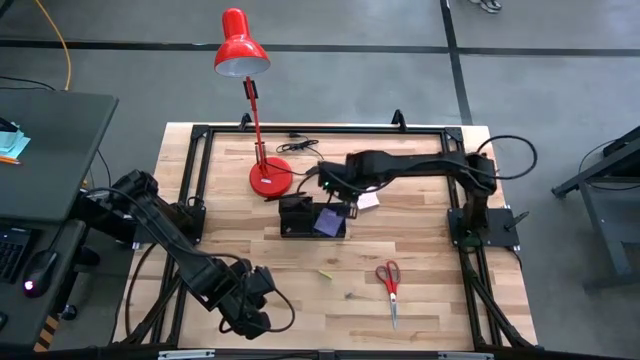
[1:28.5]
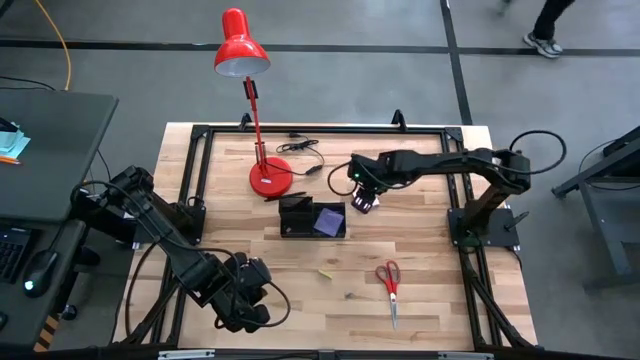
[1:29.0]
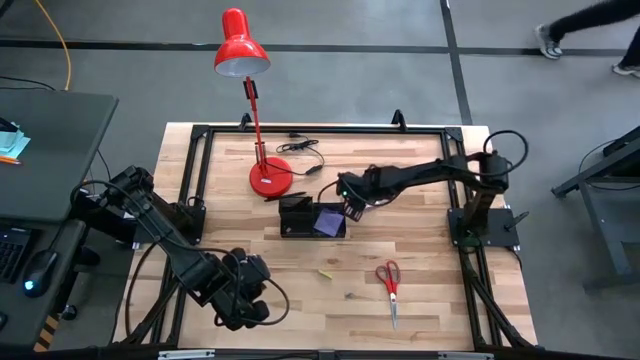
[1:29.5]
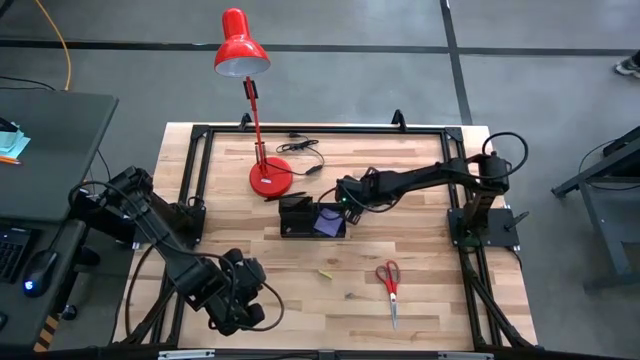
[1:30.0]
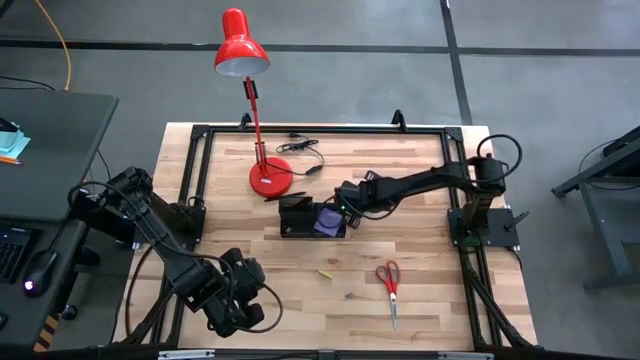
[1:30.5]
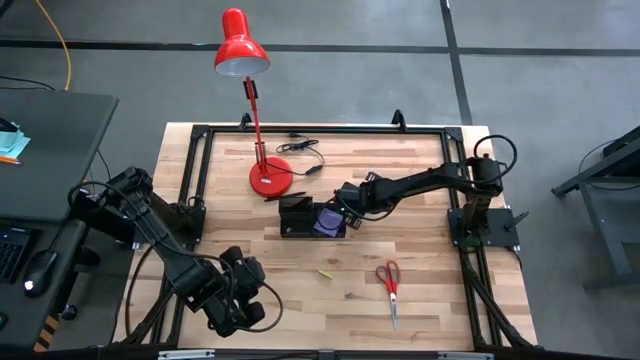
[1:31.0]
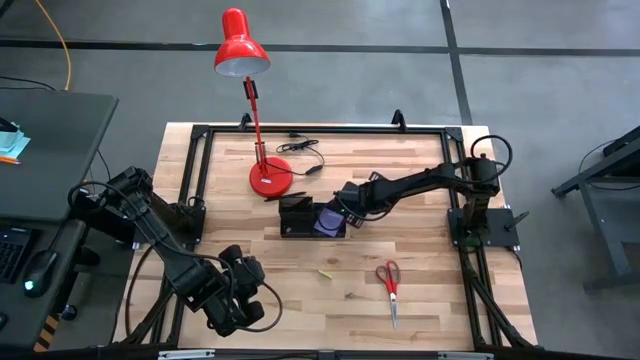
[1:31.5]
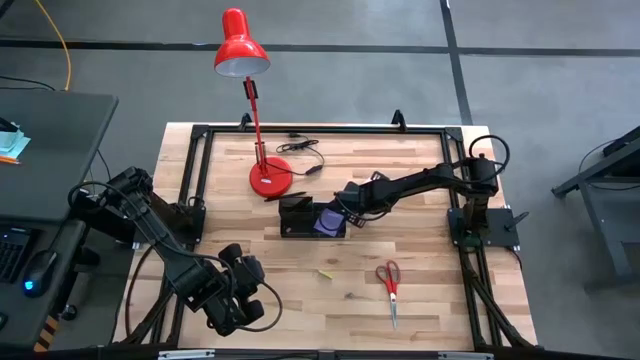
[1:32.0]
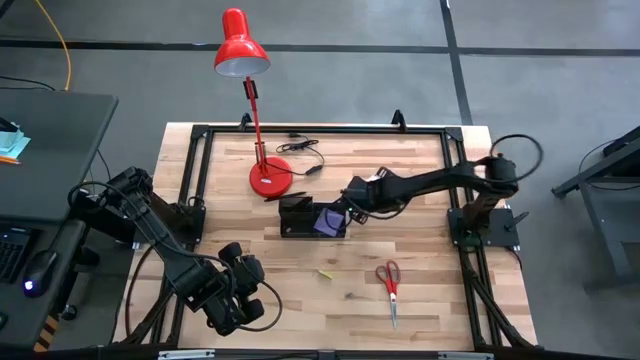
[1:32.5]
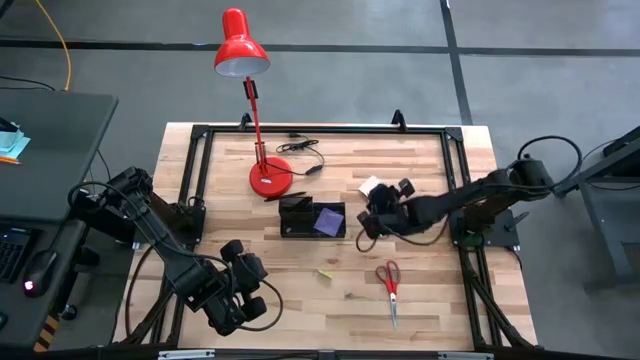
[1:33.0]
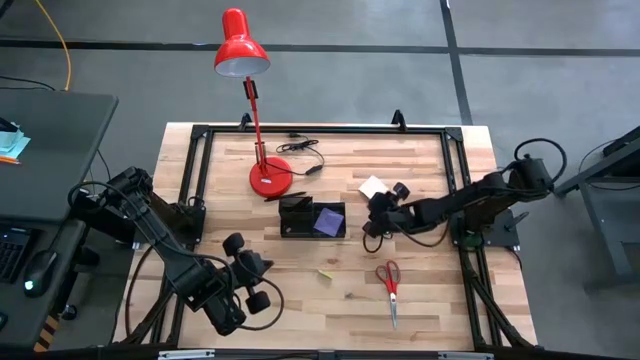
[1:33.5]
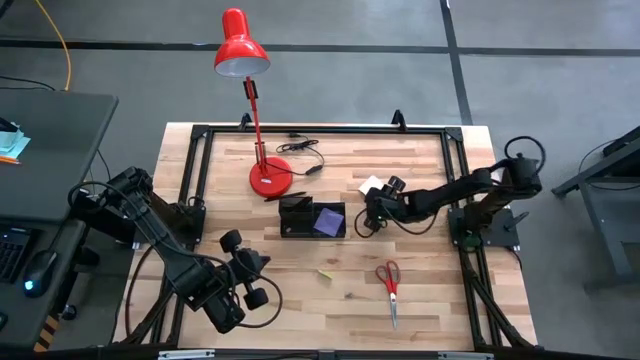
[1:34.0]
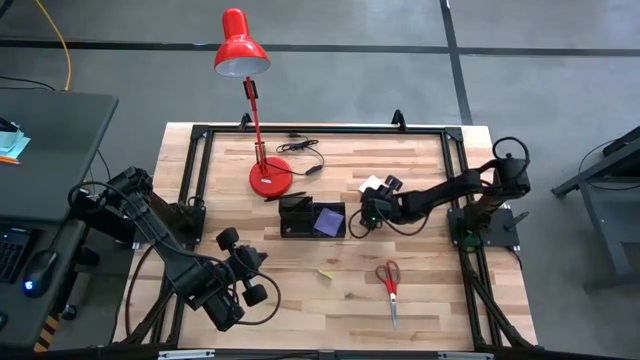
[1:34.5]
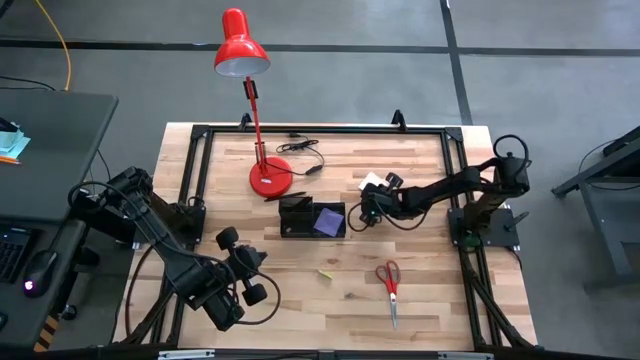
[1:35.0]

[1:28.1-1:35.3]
Task: Pick and place office supplies into organizer
Put the pink sticky note into the desk organizer

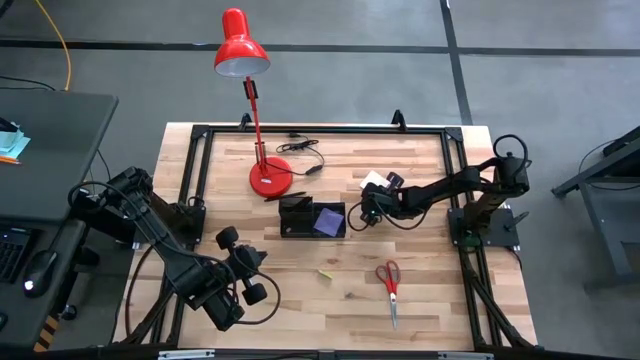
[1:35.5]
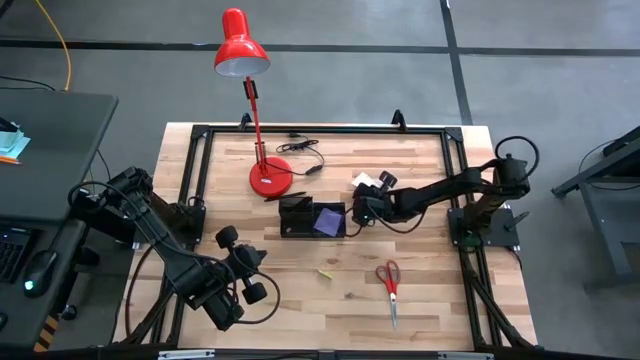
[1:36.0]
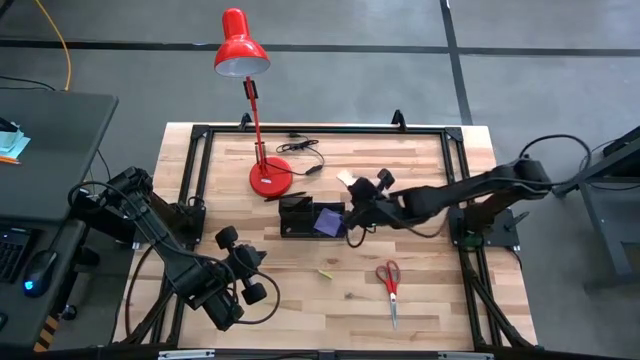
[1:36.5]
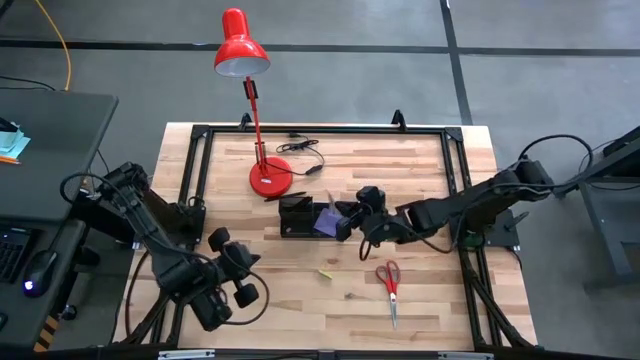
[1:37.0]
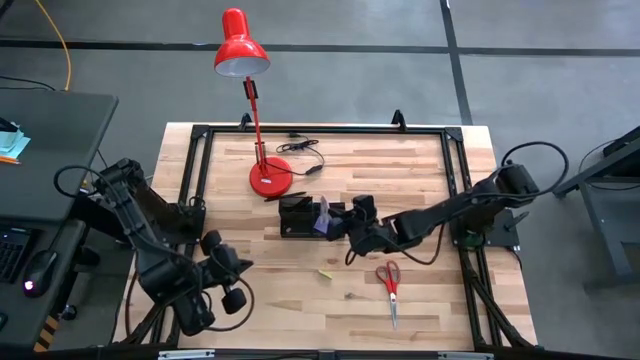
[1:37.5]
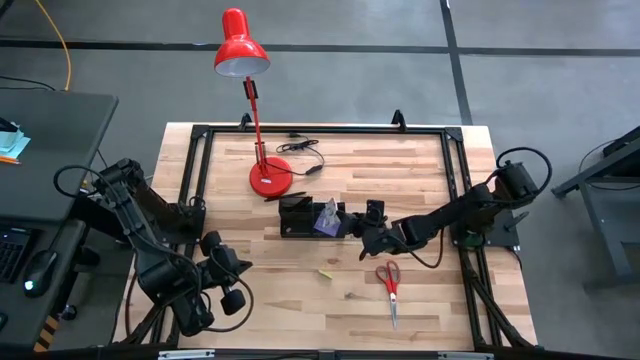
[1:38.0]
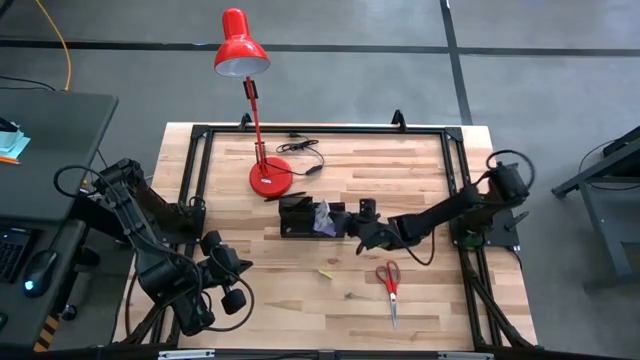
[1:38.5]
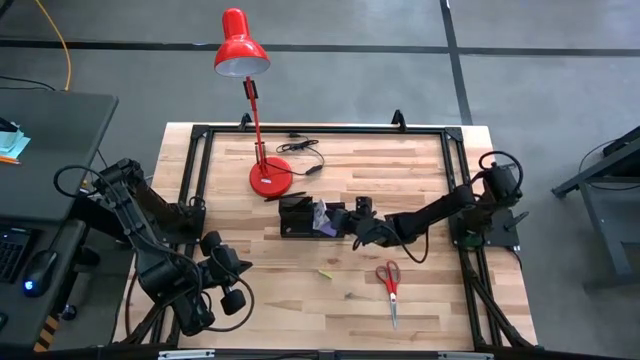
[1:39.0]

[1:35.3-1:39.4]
Put the pink sticky note into the desk organizer

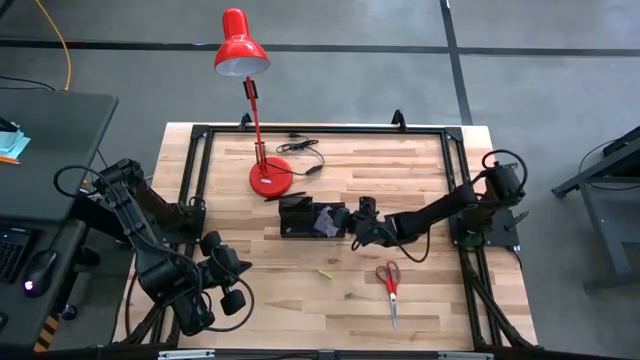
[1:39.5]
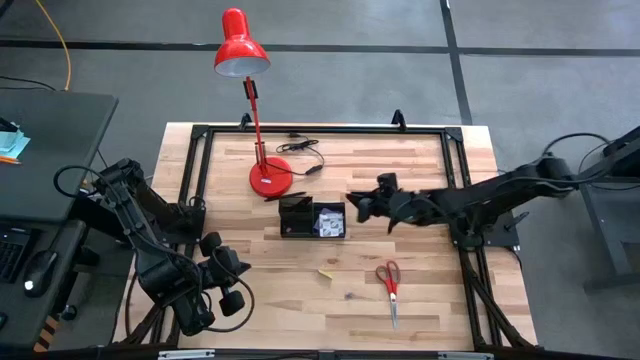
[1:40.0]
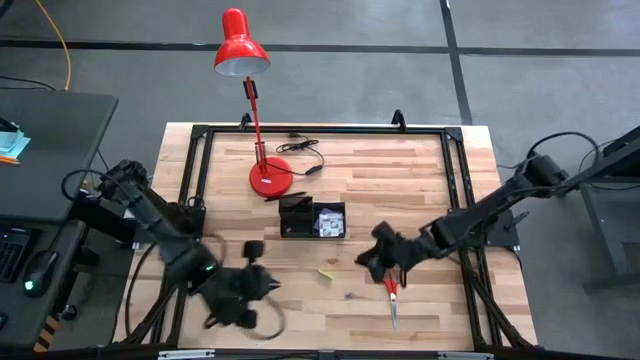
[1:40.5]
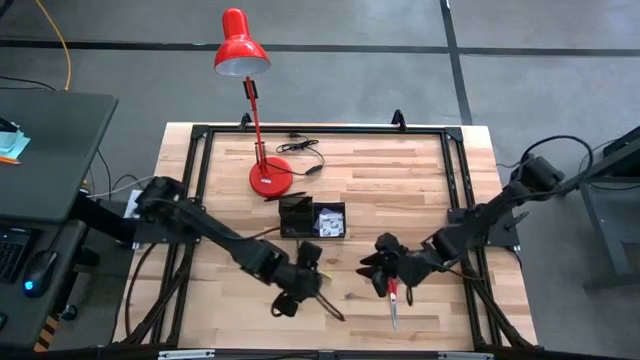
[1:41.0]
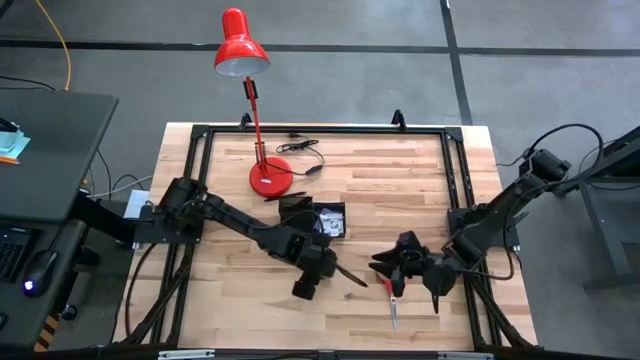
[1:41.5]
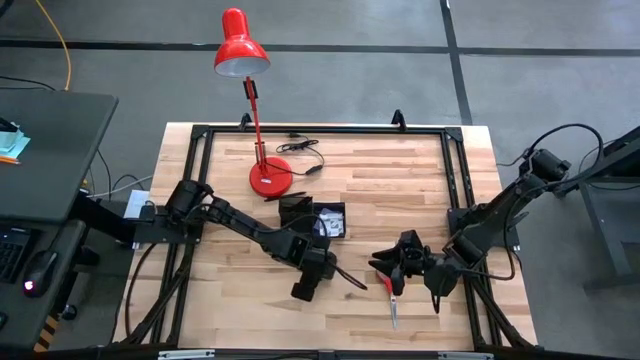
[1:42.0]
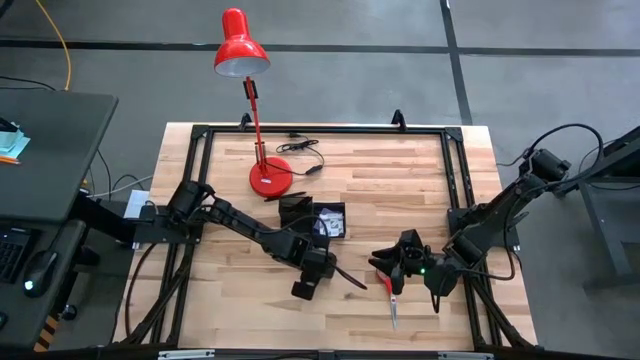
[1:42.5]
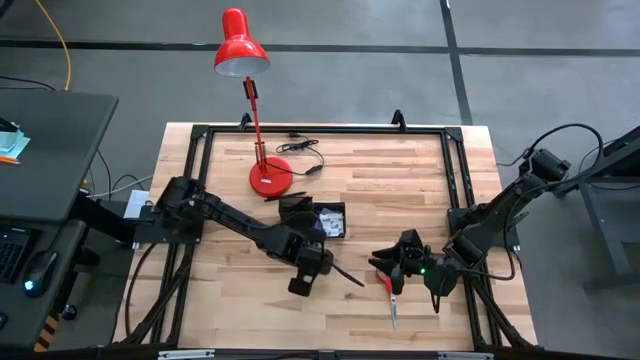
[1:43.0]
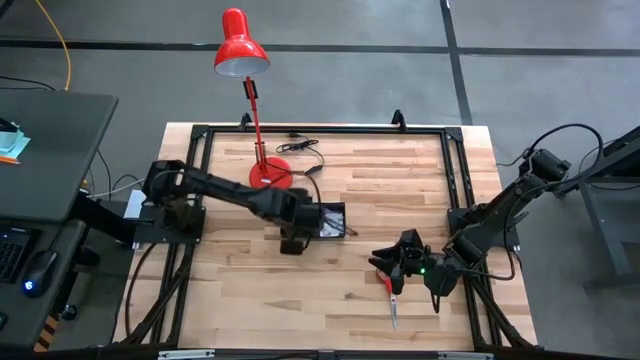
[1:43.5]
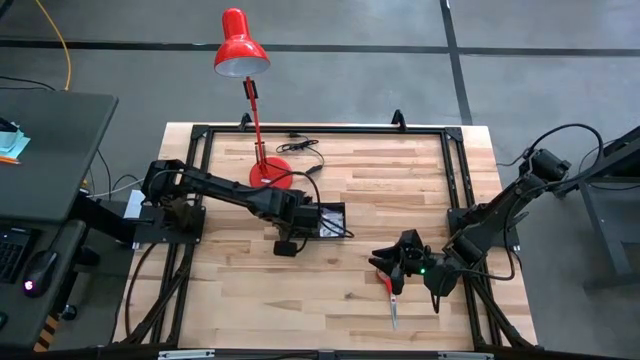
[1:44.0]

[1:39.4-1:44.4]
Put the eraser into the desk organizer

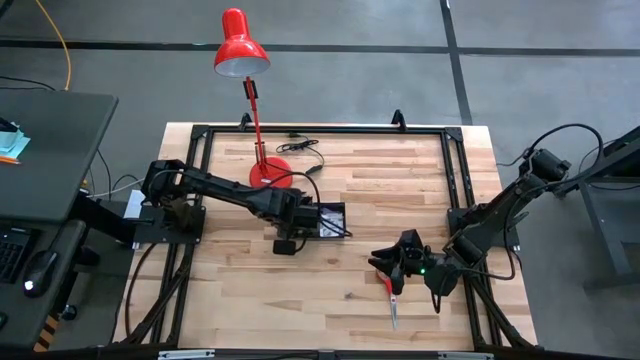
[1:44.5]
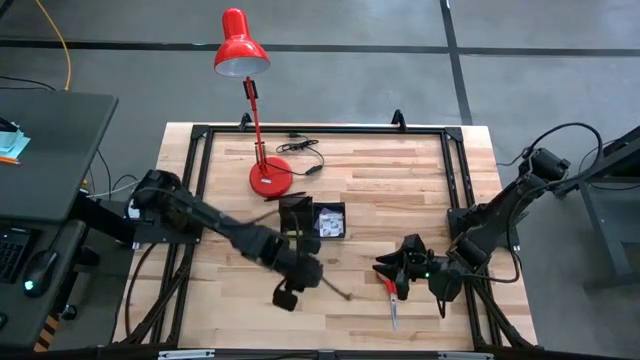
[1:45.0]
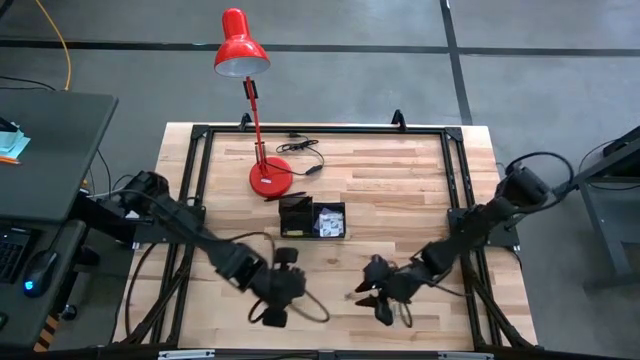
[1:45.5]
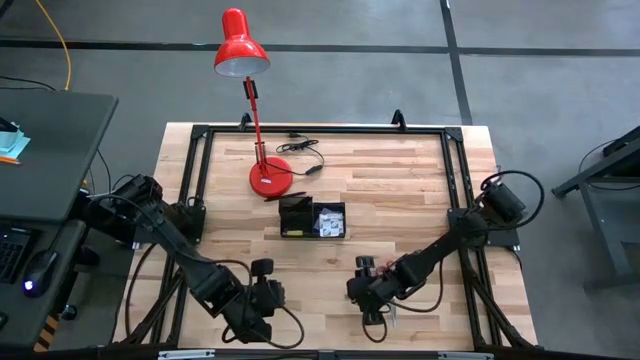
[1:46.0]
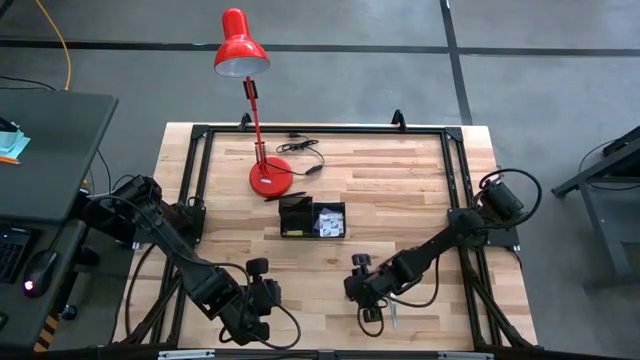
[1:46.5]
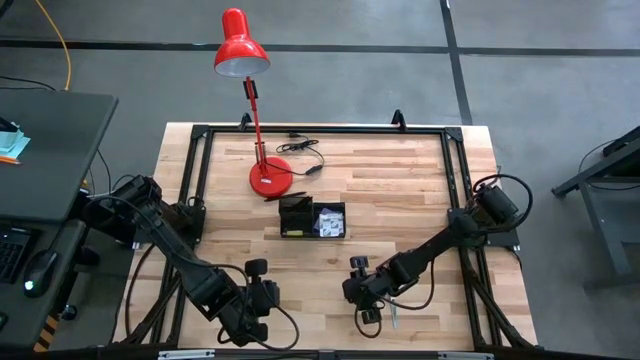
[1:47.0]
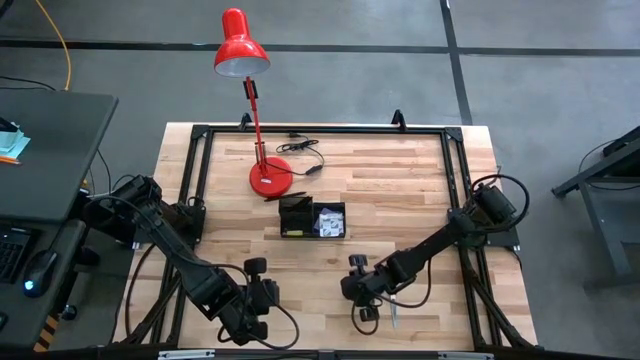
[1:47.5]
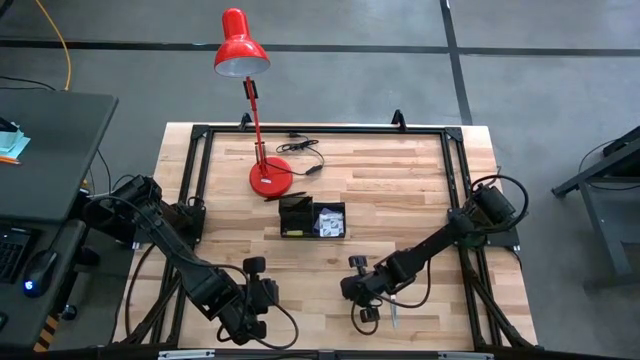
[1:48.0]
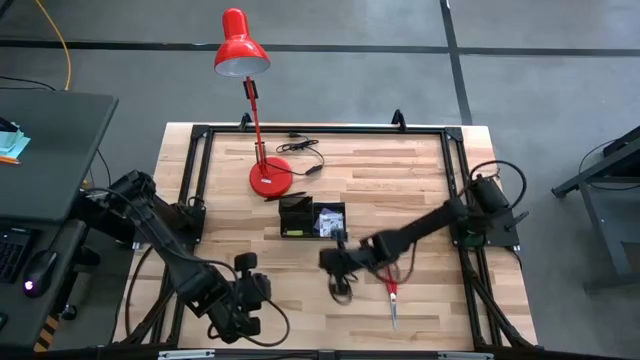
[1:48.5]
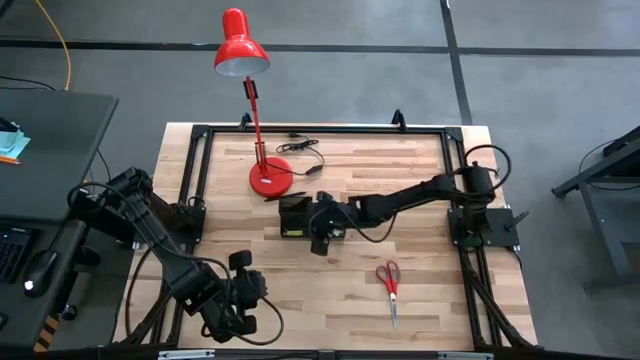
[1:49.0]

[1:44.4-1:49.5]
Put the blue binder clip into the desk organizer
